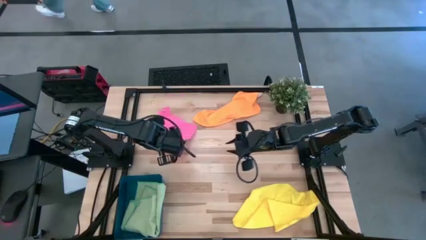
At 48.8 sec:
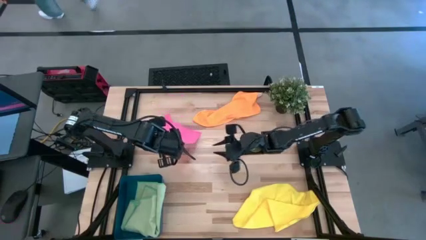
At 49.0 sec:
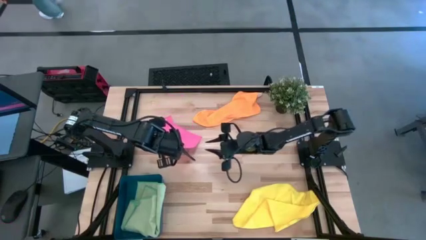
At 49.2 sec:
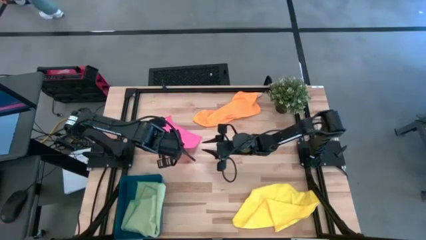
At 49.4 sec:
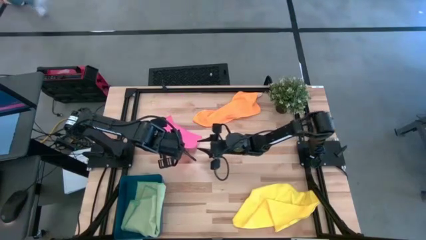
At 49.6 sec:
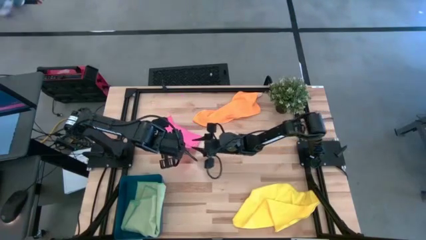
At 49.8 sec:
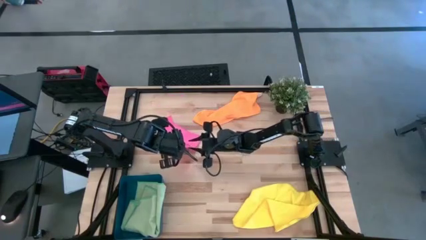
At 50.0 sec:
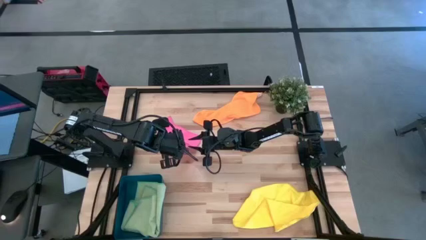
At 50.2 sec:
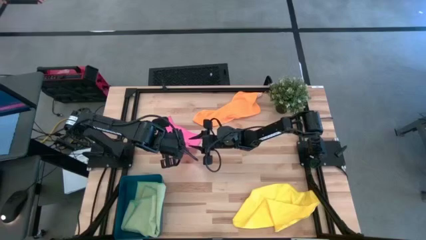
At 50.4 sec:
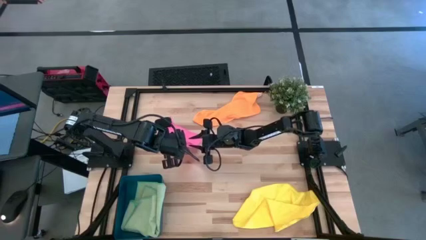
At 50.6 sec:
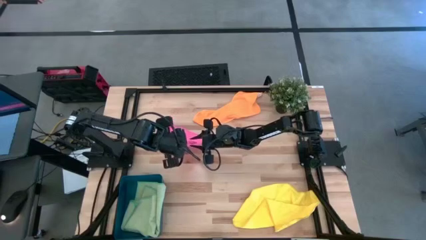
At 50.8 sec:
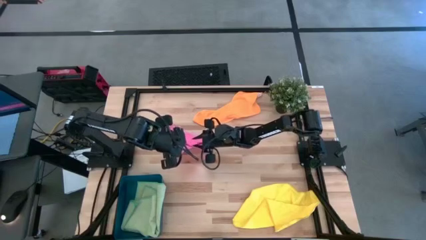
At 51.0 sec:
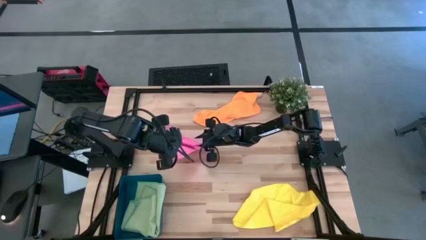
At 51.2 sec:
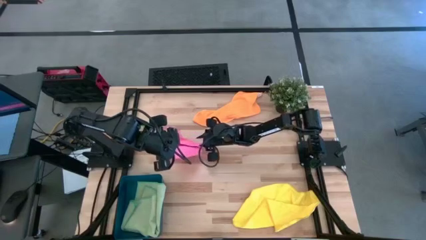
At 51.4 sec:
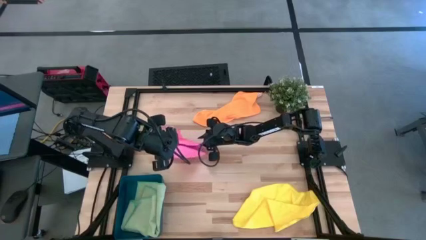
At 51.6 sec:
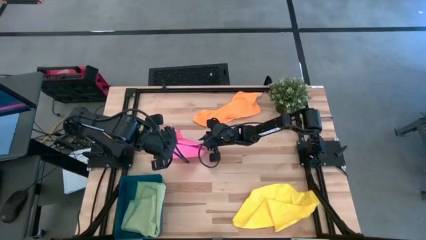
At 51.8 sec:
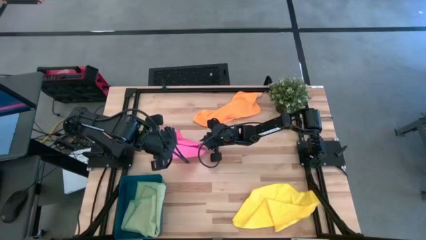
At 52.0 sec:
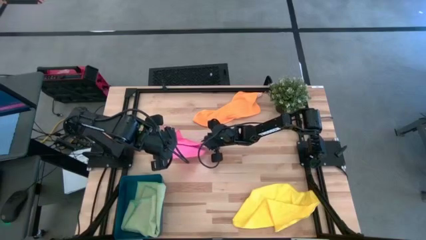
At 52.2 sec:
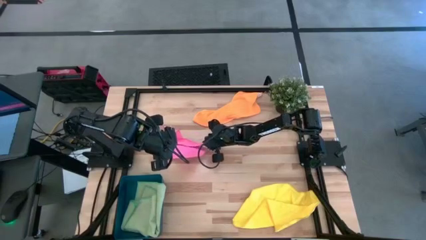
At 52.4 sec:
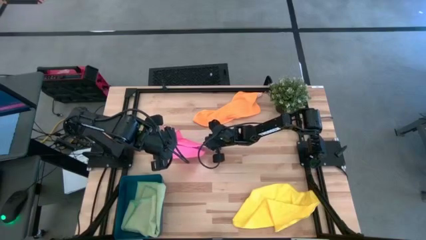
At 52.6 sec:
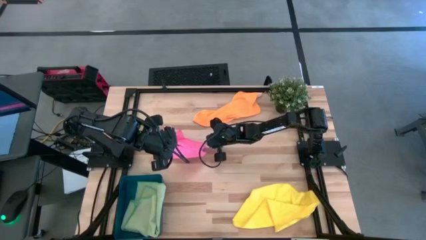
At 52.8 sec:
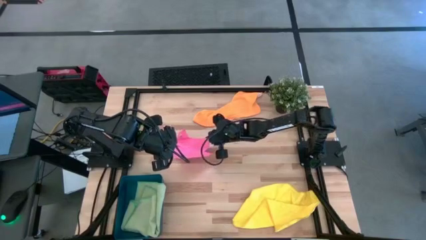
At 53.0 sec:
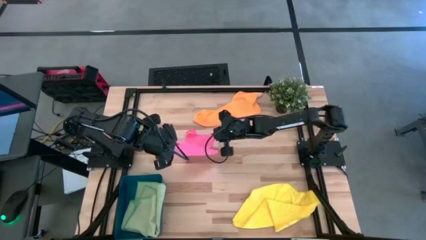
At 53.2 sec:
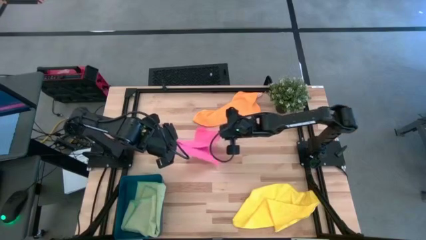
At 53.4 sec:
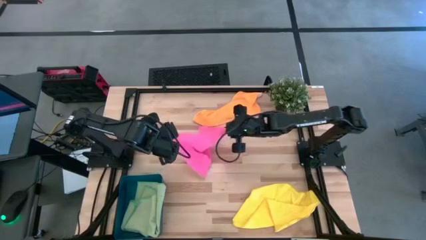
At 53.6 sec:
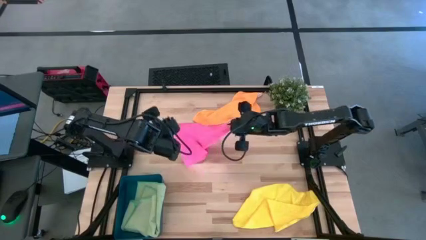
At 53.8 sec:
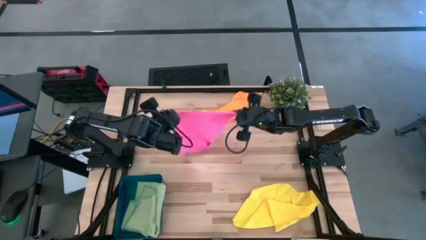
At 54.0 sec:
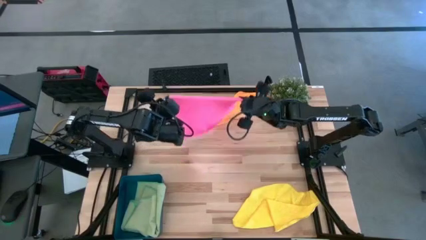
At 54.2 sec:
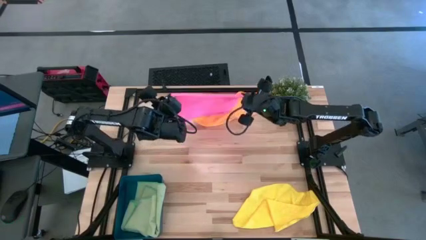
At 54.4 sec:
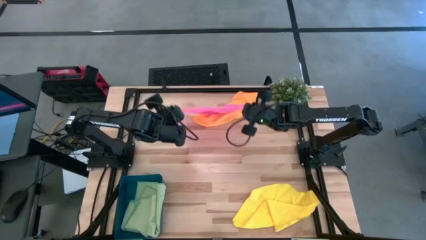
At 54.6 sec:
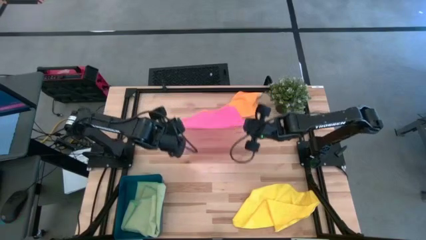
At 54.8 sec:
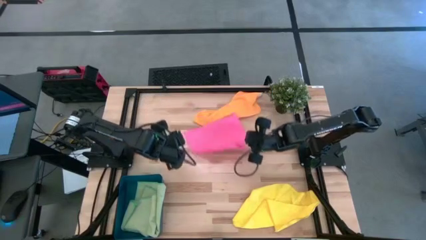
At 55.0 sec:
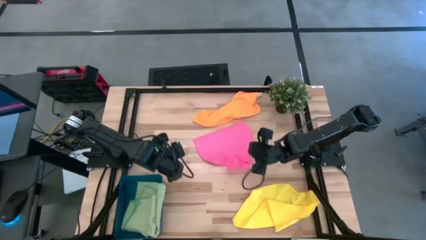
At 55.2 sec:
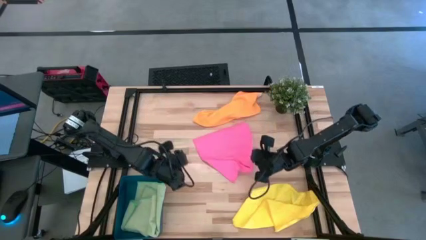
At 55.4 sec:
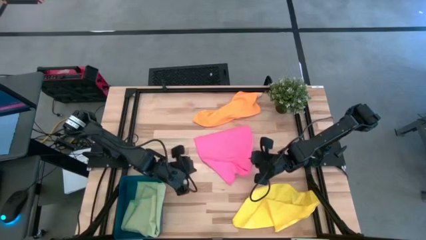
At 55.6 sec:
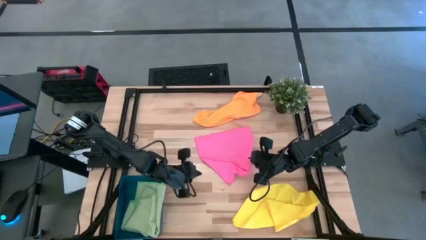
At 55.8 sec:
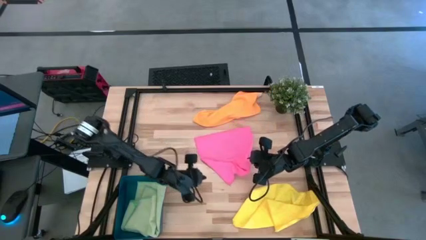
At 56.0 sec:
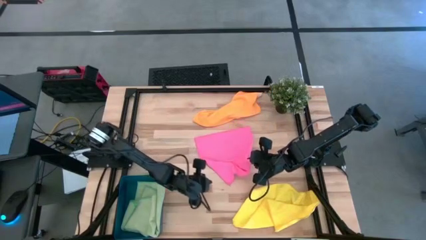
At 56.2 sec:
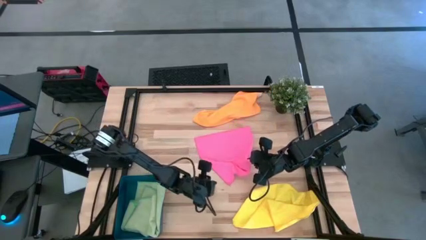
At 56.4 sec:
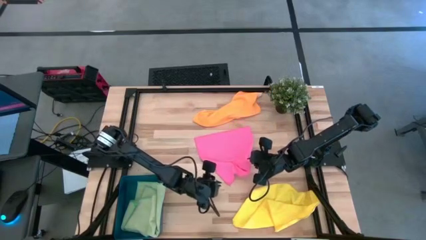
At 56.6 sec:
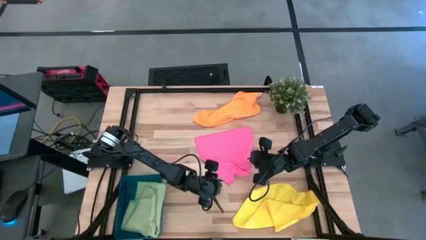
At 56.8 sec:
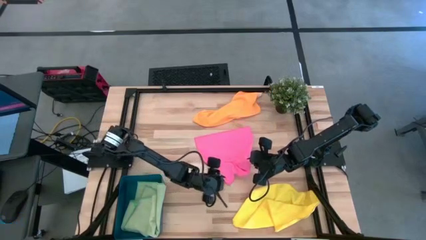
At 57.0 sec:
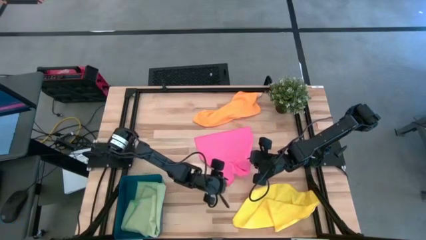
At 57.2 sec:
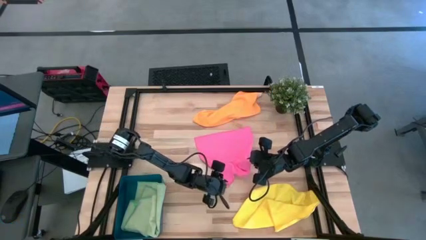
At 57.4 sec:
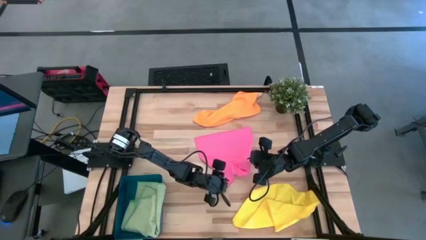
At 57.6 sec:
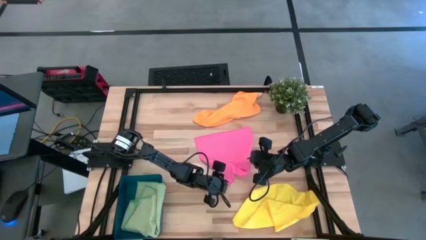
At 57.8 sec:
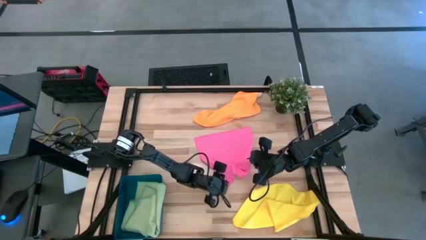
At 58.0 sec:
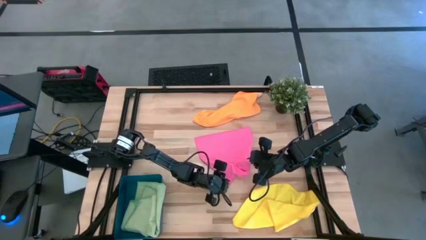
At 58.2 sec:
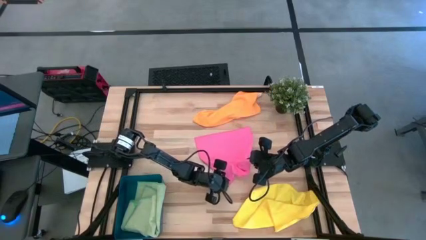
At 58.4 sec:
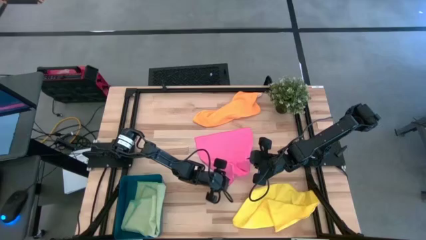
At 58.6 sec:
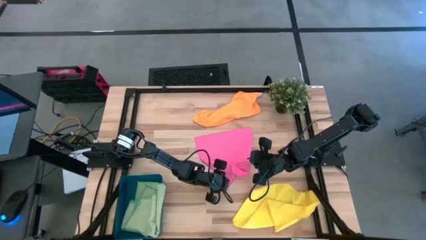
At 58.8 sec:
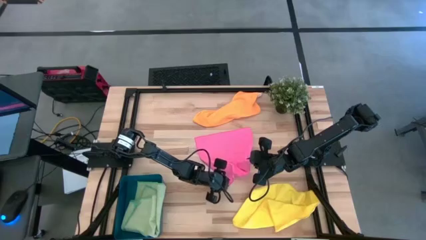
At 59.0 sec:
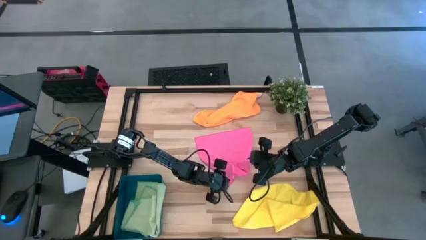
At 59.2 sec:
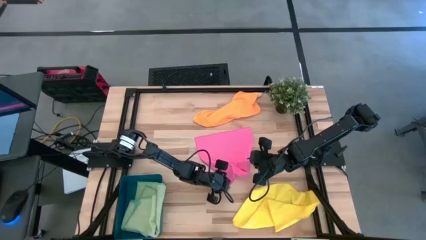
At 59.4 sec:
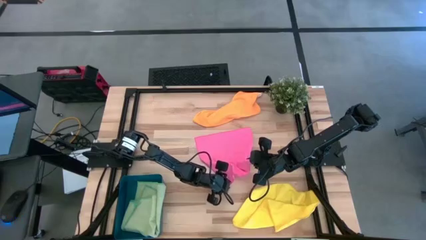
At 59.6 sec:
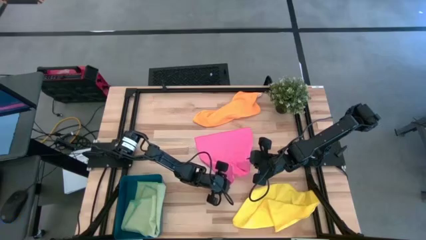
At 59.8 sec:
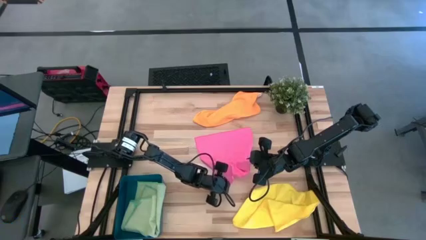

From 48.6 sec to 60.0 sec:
Task: Fold microfiber towels
Fold the pink microfiber towel

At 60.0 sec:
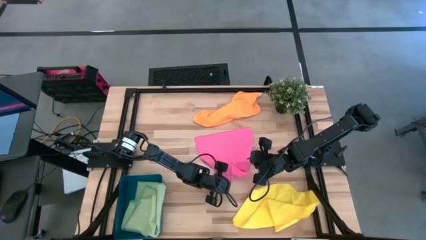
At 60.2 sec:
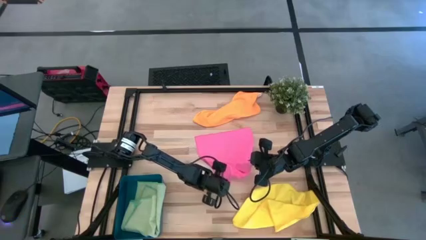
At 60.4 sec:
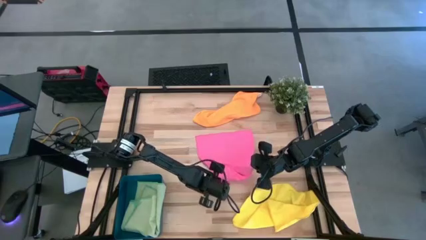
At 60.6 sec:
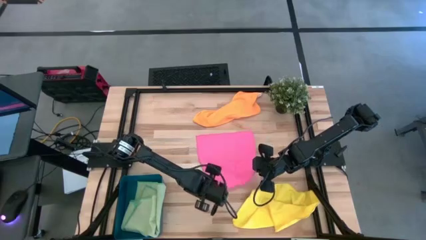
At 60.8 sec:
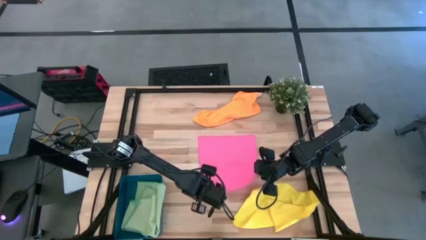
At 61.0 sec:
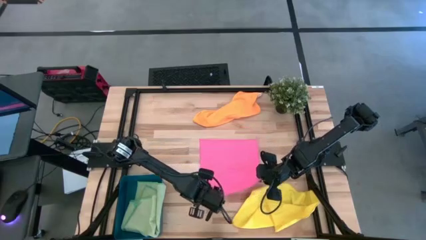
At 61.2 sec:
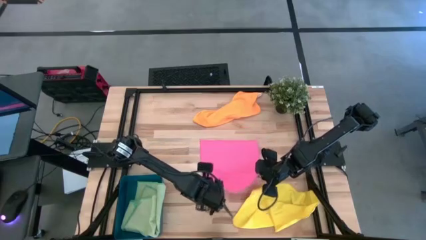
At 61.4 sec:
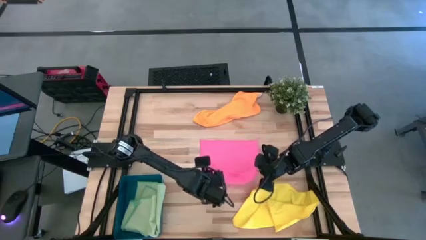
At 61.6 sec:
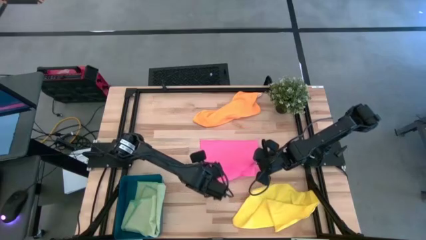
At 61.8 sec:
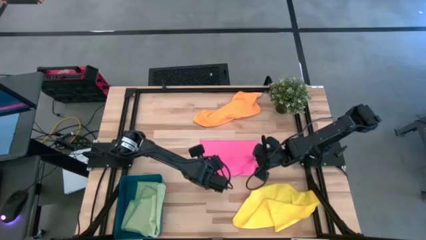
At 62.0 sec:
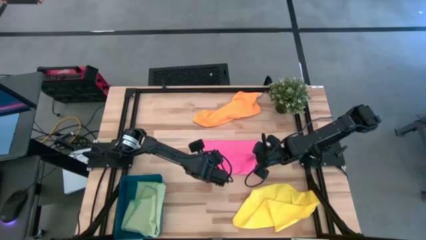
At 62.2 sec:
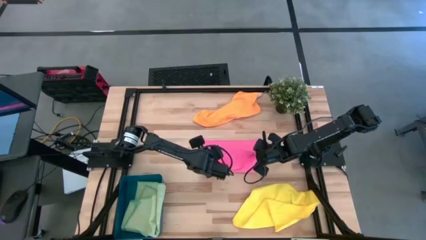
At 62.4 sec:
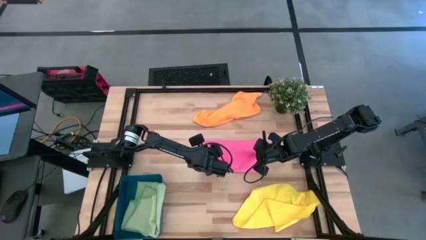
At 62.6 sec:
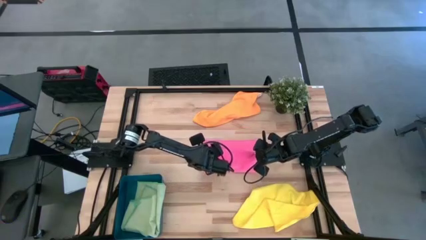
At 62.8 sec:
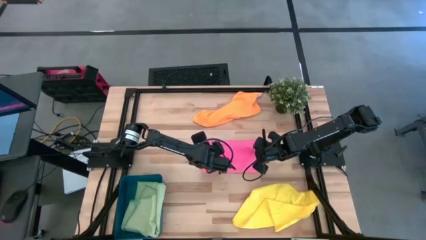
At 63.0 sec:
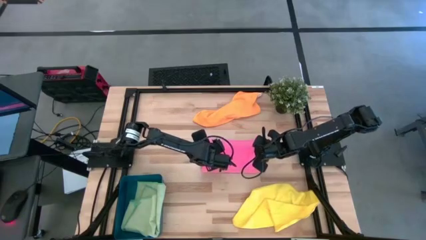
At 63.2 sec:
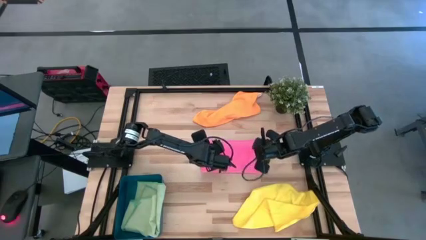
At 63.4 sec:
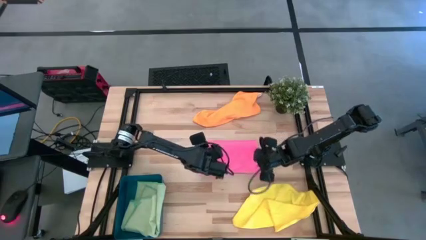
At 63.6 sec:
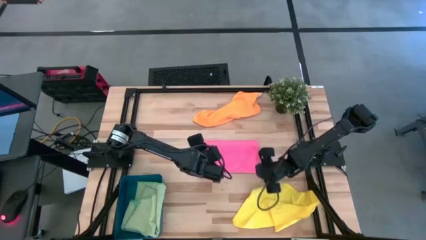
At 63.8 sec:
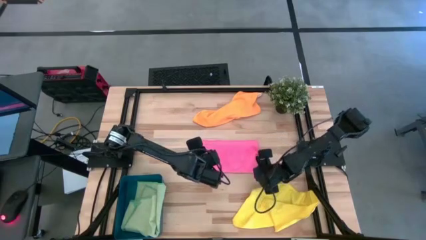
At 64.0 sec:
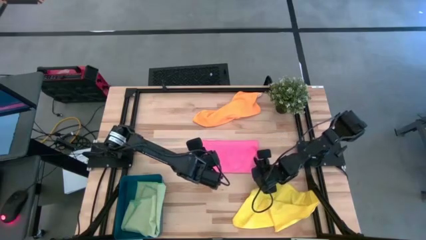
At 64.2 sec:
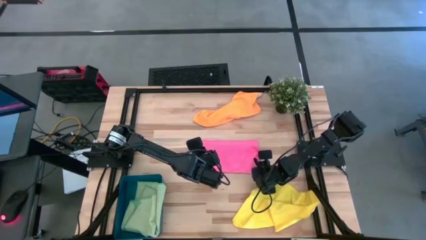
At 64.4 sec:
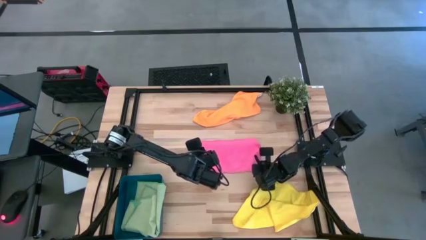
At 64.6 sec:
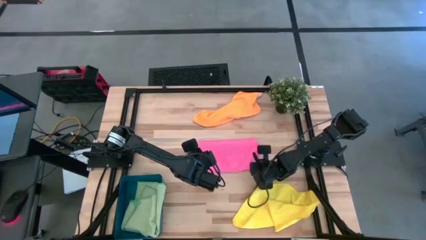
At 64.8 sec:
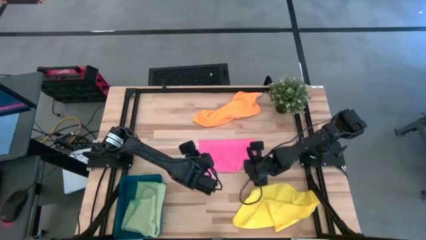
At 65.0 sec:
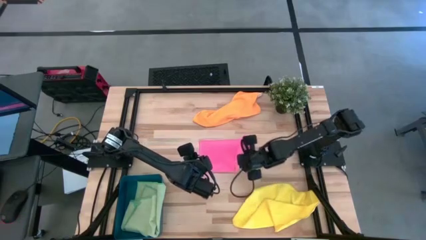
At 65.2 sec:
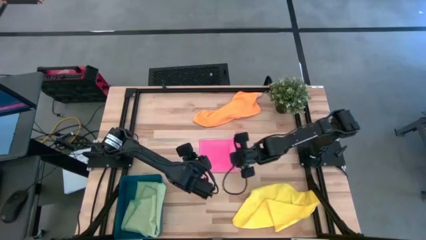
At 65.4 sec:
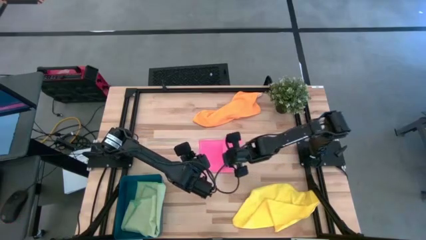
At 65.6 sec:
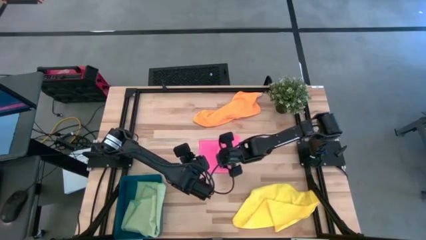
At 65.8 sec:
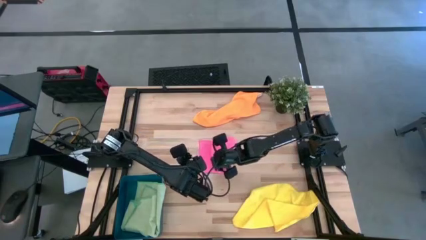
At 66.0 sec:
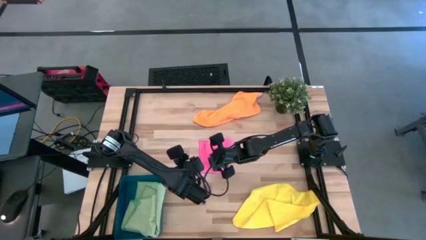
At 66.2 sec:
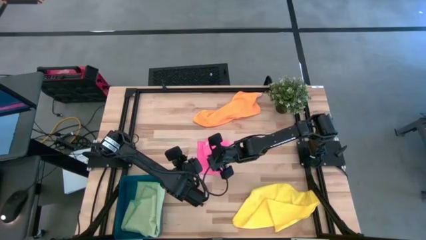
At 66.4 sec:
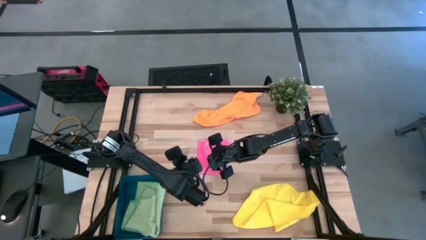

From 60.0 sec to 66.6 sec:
Fold the pink microfiber towel
